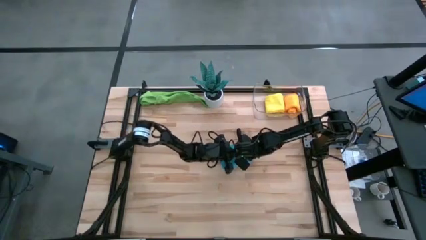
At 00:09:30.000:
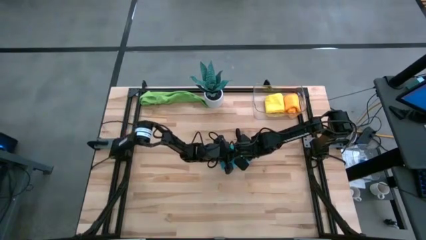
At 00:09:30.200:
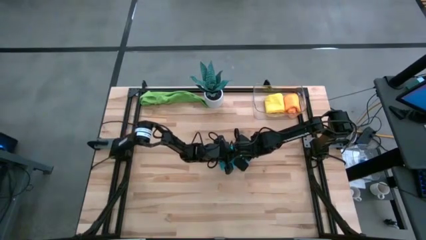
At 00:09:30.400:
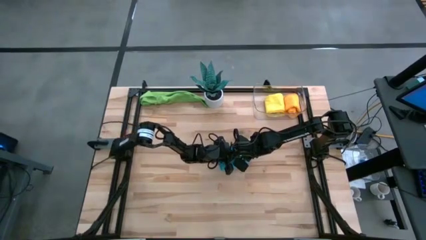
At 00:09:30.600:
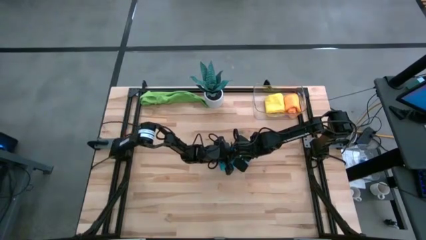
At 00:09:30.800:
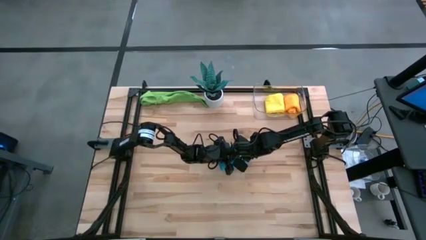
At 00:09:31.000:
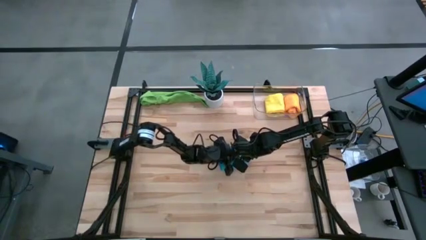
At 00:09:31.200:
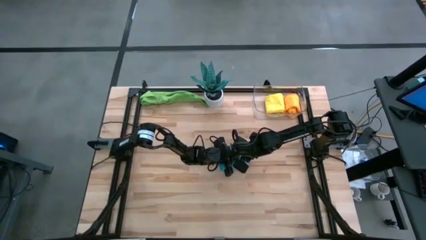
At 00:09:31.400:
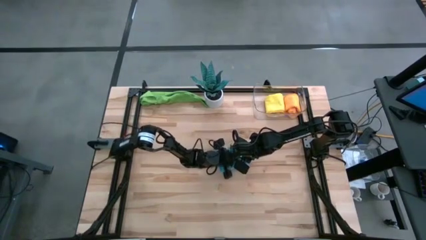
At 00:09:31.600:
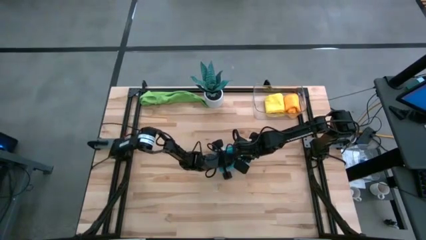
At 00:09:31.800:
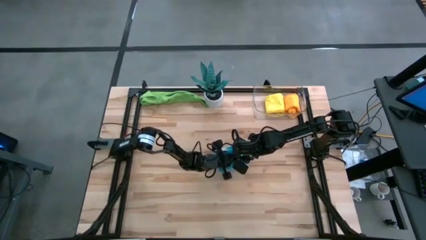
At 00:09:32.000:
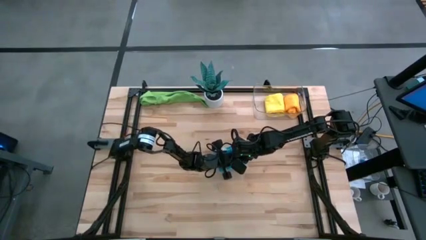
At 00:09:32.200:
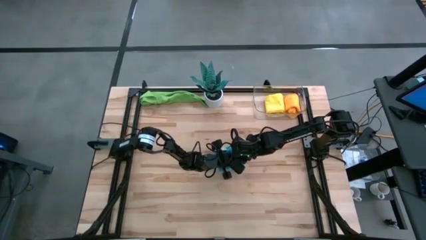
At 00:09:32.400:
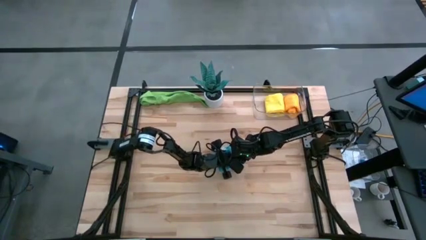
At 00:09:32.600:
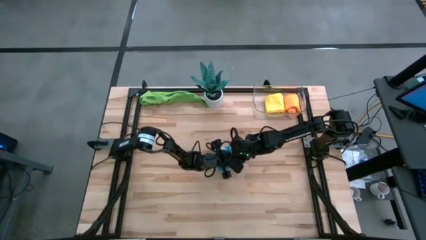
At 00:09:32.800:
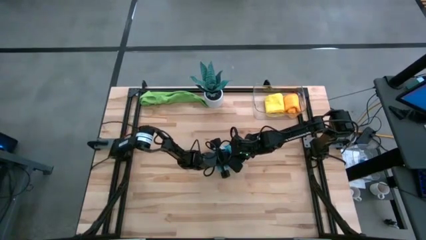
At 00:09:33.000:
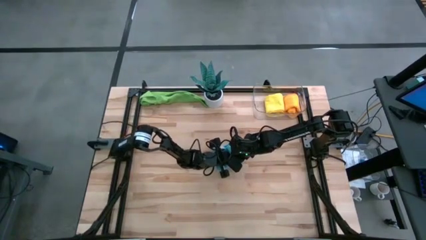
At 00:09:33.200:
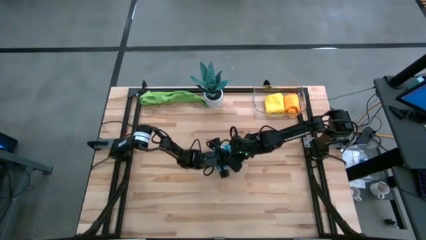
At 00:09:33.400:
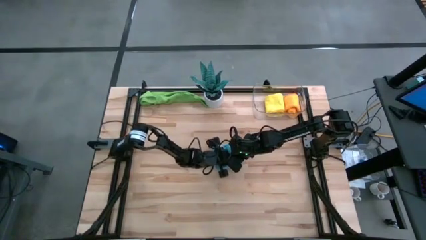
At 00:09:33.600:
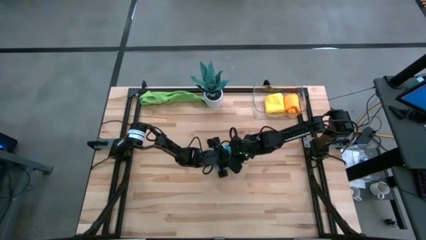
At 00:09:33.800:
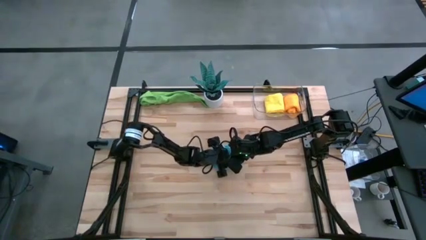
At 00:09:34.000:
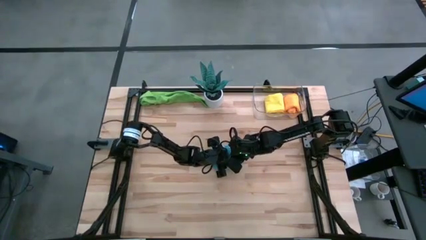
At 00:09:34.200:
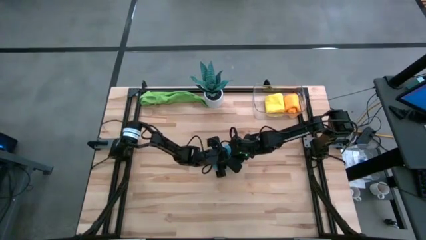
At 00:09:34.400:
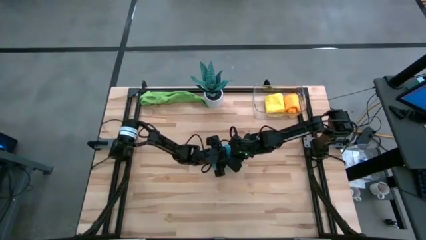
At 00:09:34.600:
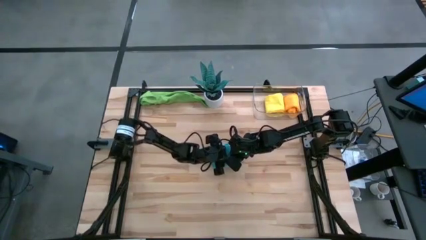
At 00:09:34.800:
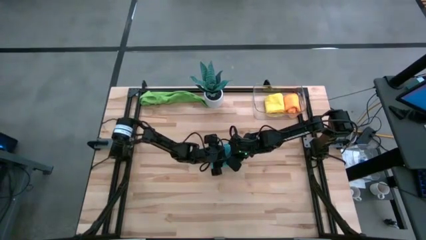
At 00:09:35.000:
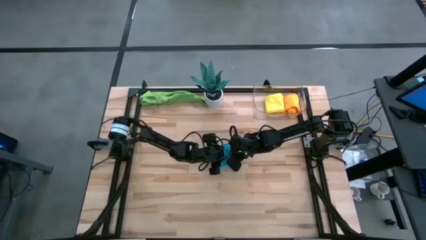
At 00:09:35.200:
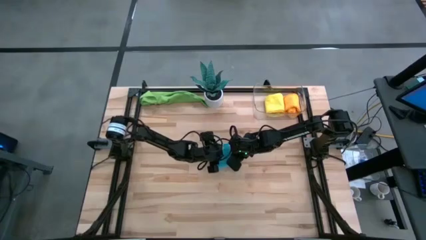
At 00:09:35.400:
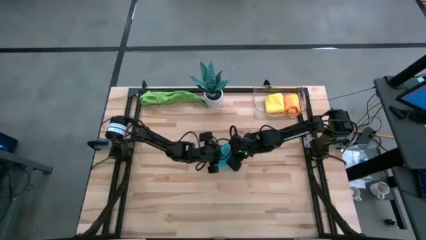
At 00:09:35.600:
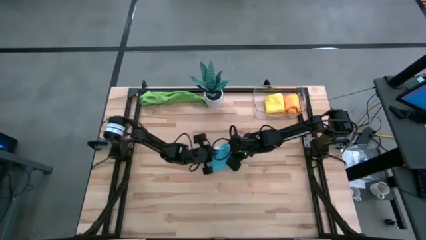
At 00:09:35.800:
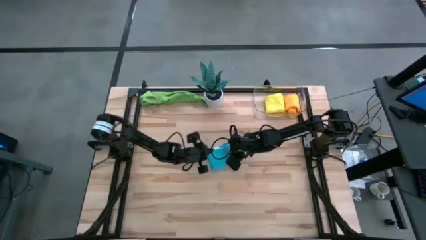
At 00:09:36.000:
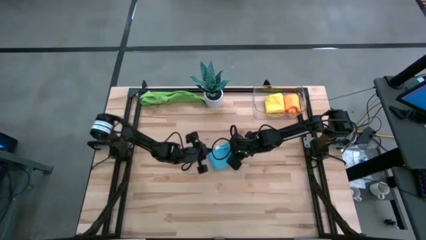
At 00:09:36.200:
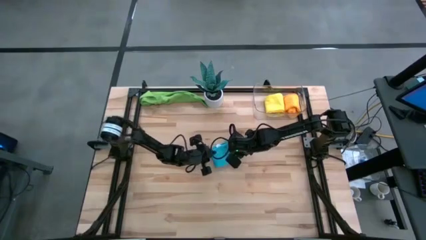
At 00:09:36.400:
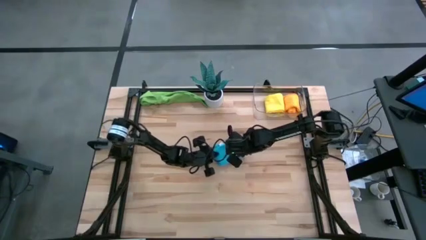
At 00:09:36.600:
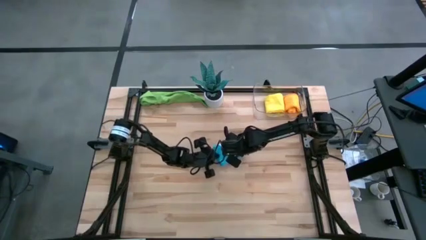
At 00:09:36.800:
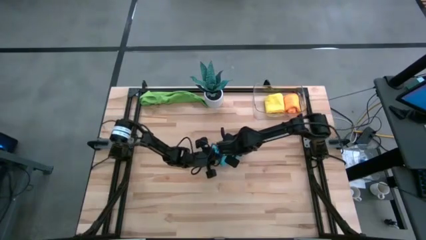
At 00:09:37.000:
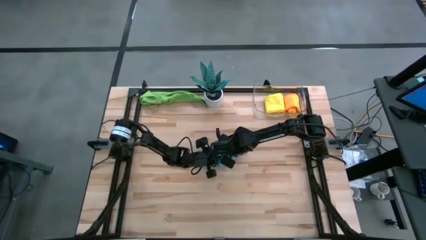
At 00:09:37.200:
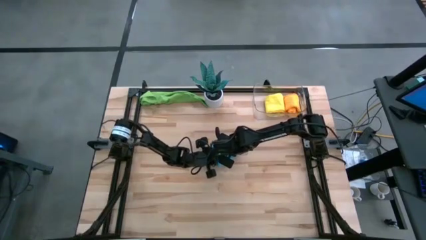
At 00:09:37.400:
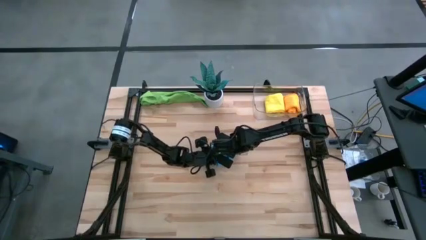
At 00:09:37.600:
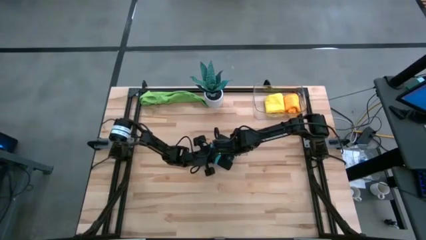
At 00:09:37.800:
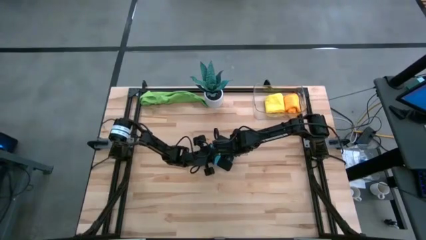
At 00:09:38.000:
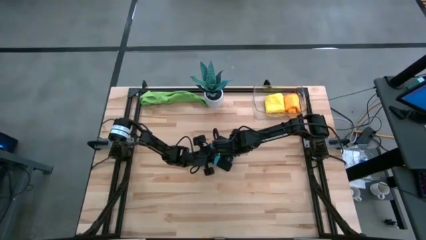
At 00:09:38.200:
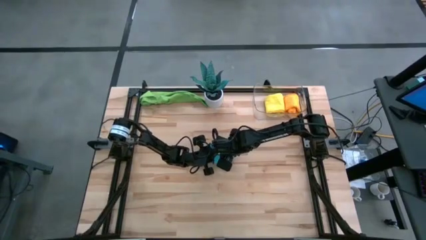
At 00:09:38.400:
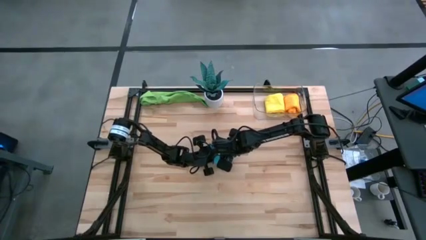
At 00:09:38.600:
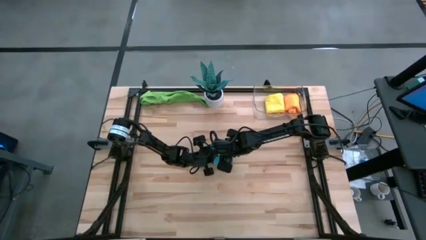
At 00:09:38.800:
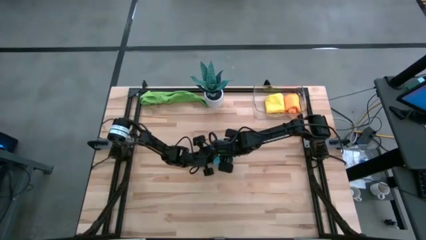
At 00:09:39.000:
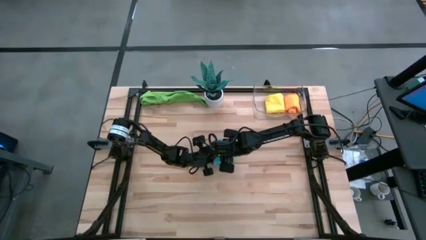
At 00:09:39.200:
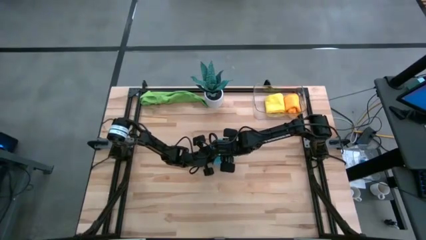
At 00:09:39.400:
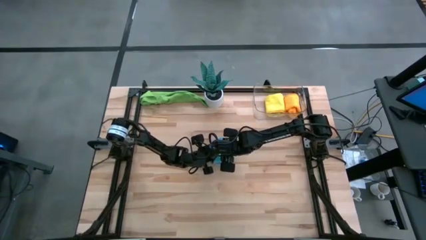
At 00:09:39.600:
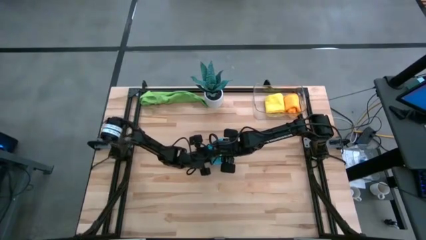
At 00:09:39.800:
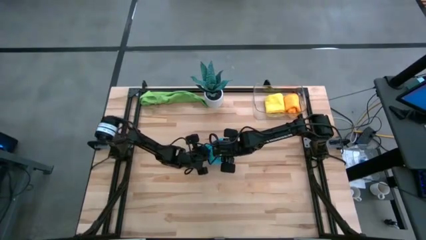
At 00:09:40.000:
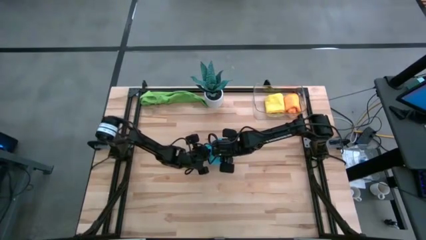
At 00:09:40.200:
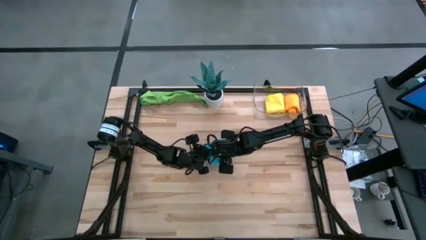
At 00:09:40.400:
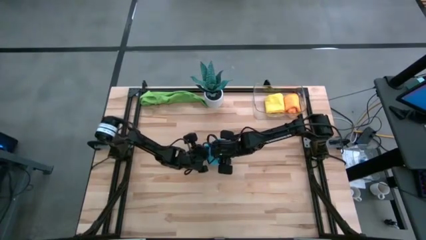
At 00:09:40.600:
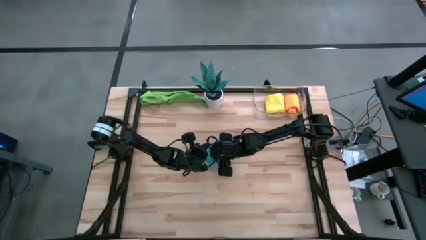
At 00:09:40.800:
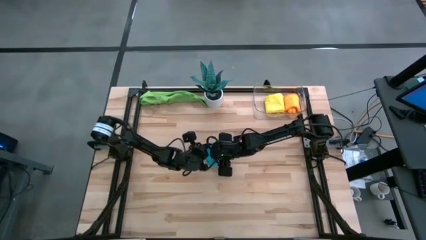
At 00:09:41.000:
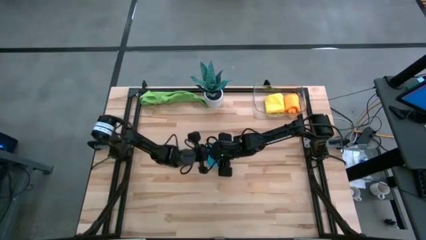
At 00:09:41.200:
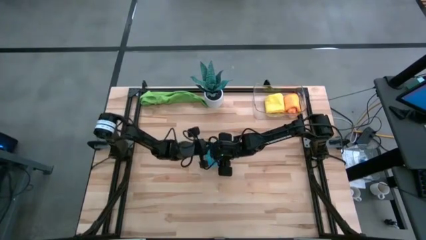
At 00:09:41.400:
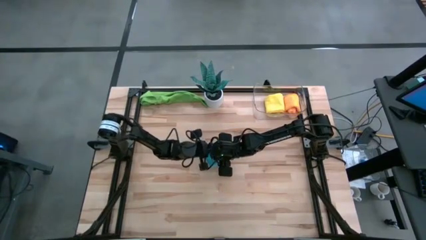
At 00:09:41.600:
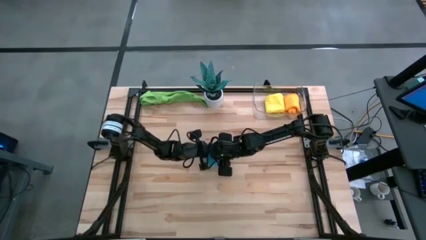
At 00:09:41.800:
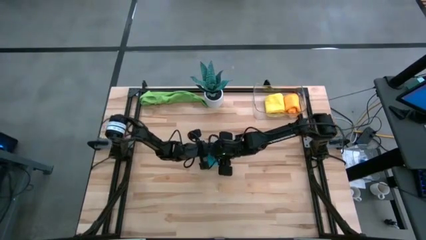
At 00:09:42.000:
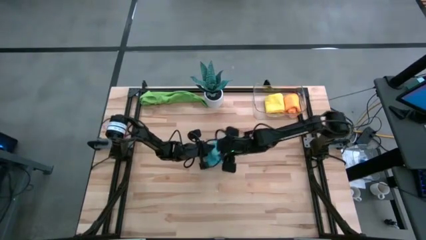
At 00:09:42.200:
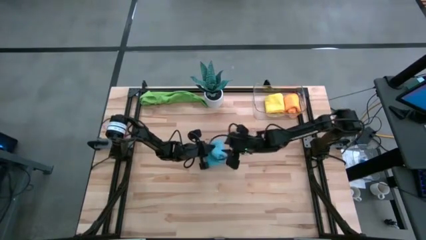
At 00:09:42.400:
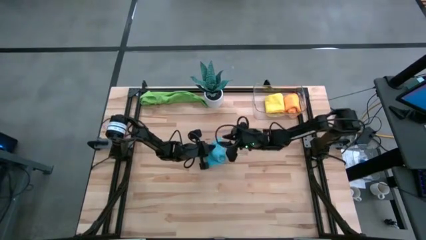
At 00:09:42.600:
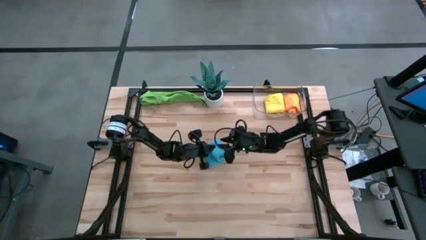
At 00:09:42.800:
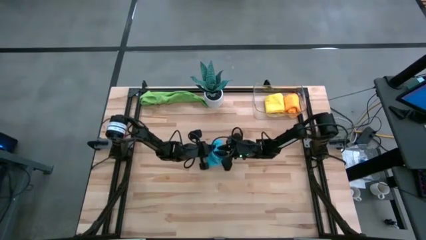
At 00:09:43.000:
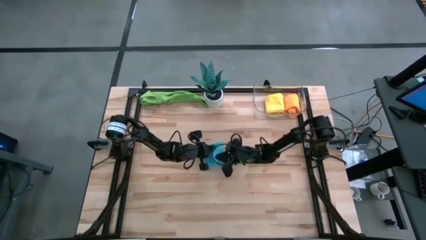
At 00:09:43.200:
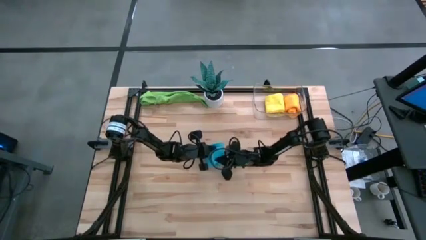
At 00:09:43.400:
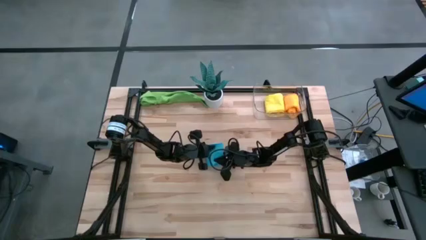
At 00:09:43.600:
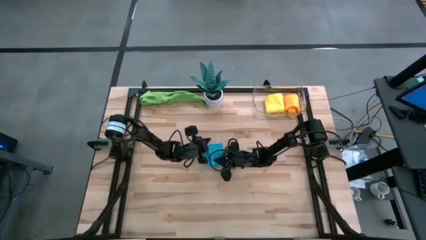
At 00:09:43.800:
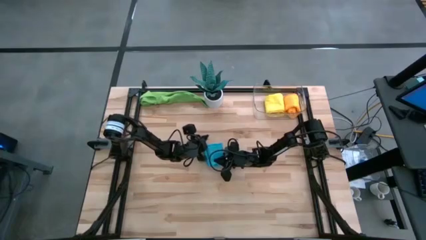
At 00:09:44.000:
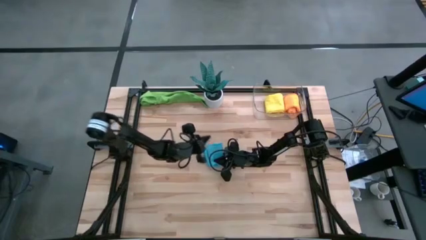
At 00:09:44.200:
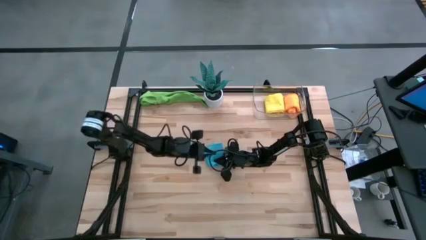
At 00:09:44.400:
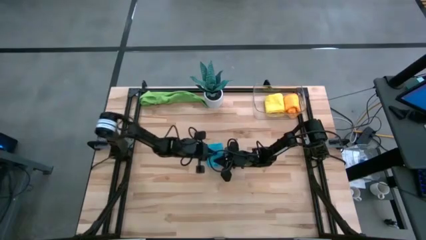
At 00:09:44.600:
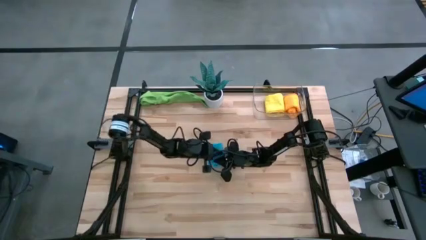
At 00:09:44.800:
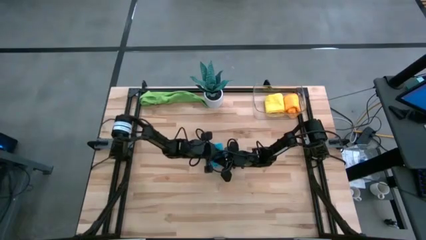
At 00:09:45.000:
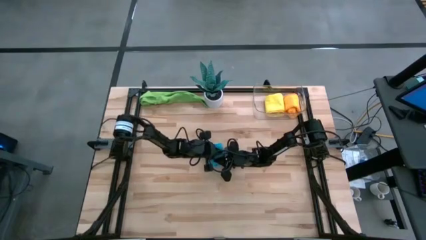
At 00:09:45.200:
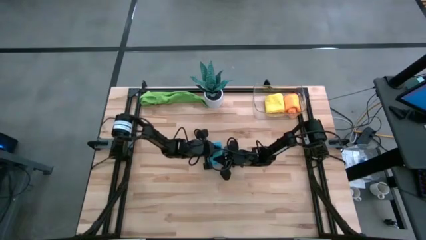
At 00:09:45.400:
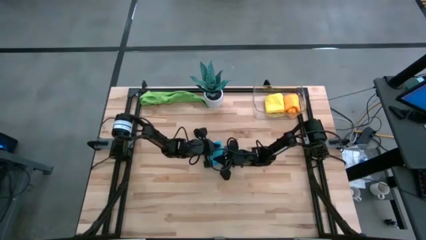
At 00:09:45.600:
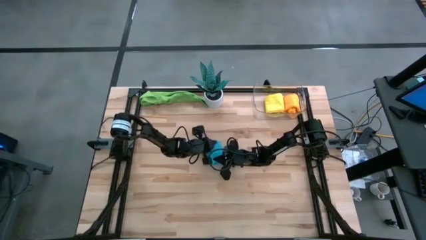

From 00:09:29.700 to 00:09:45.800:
Task: Roll microfiber towels into tight, uniform cylinder then place into a basket
Roll the blue microfiber cloth
